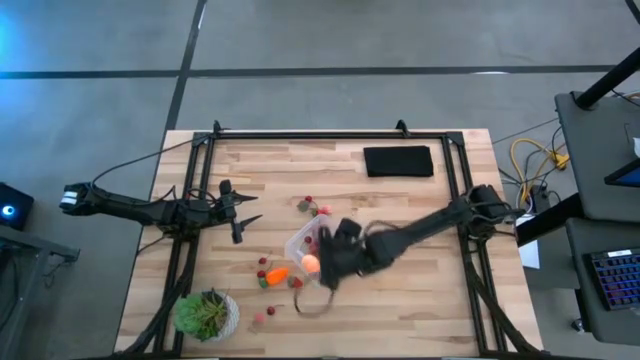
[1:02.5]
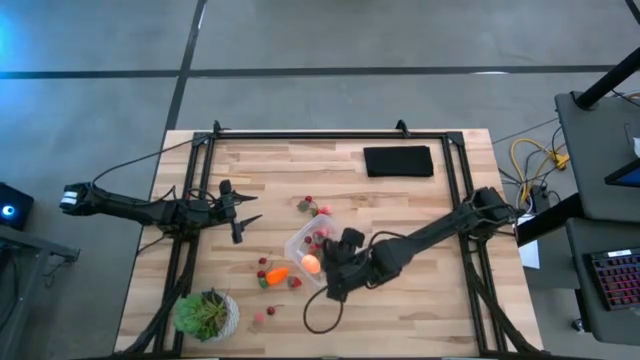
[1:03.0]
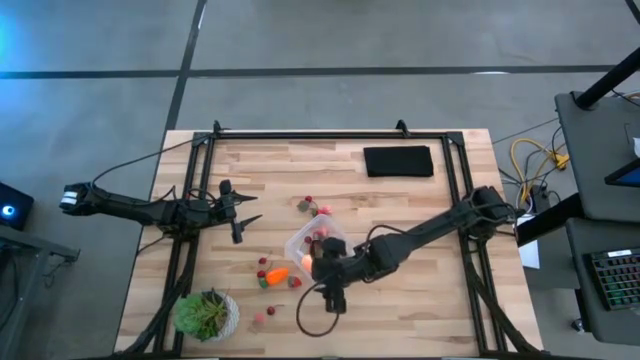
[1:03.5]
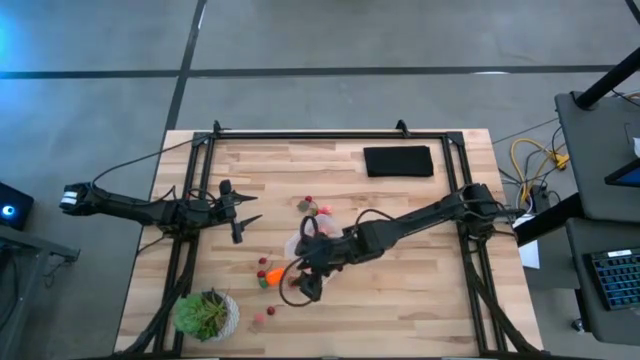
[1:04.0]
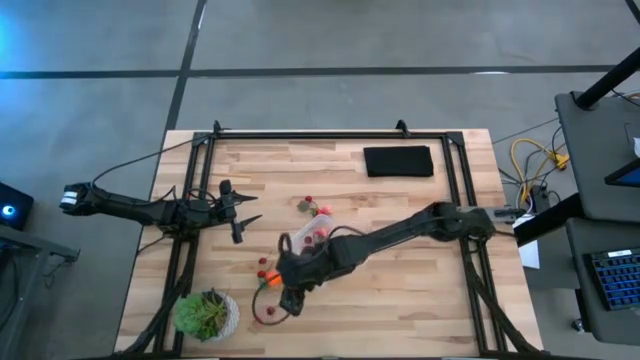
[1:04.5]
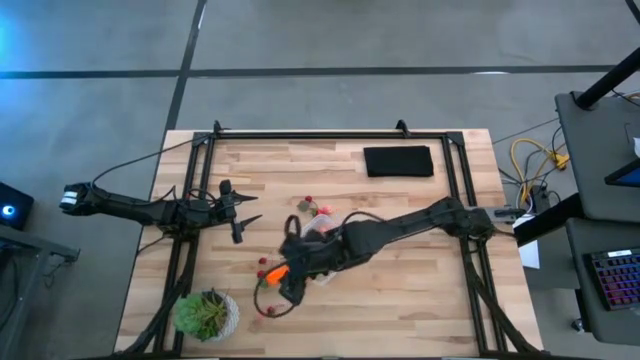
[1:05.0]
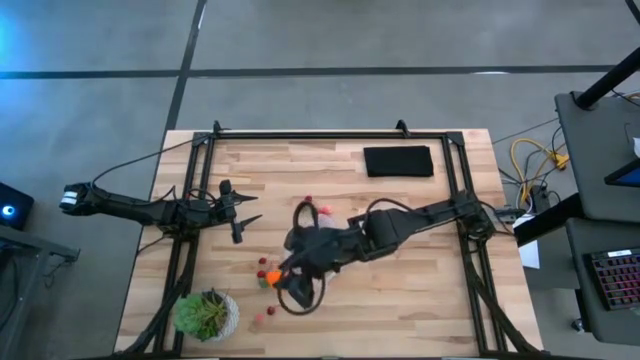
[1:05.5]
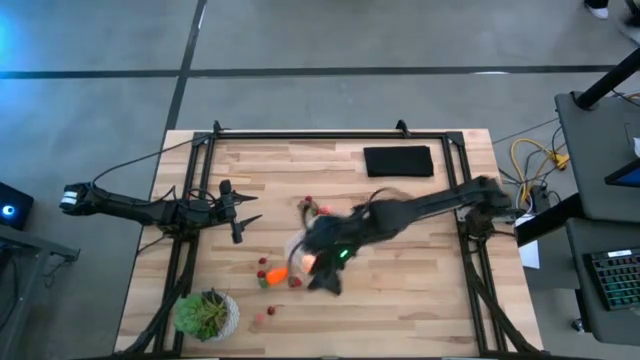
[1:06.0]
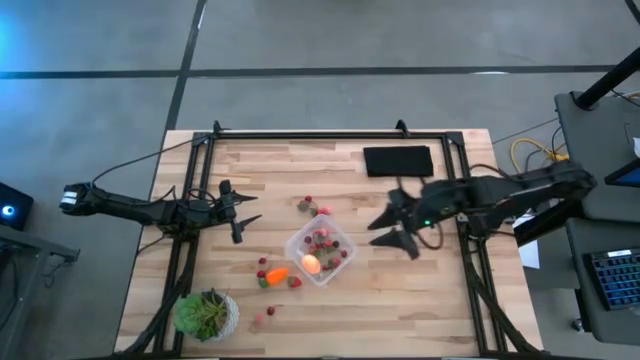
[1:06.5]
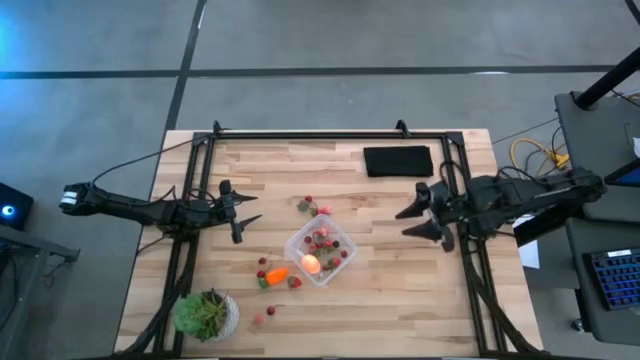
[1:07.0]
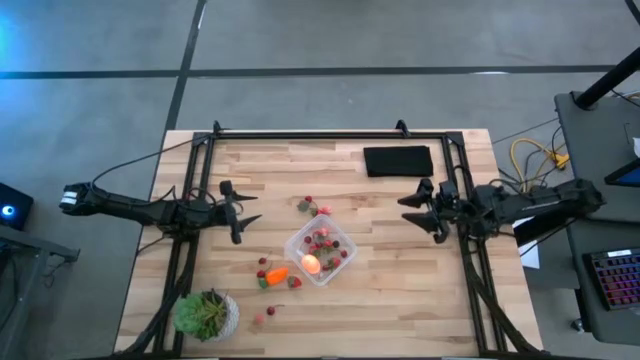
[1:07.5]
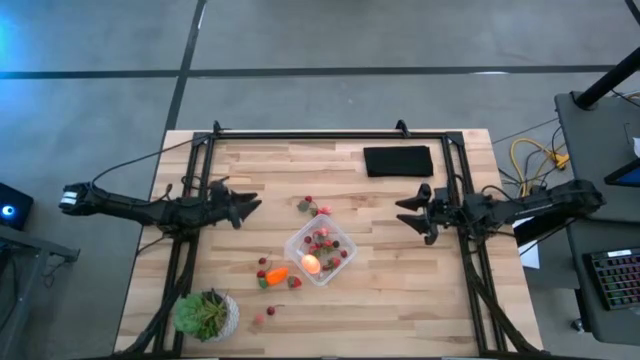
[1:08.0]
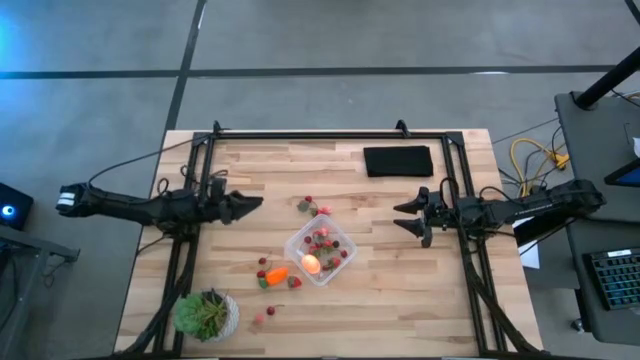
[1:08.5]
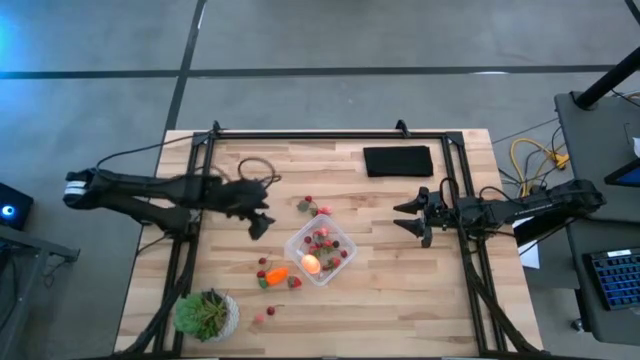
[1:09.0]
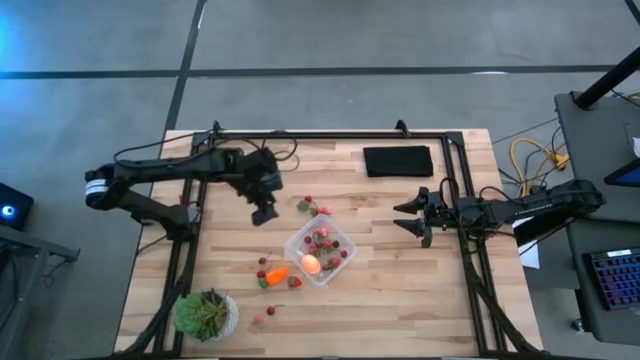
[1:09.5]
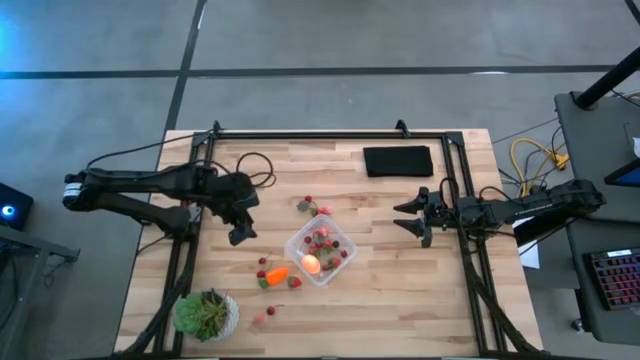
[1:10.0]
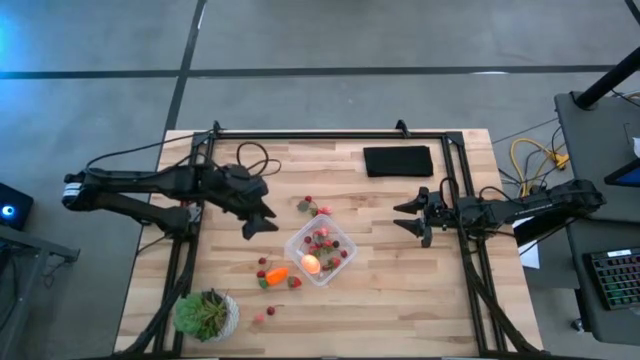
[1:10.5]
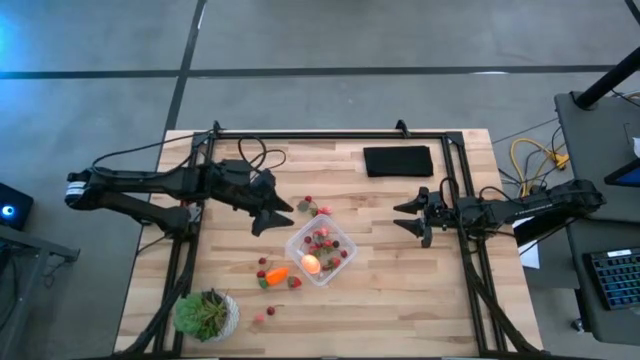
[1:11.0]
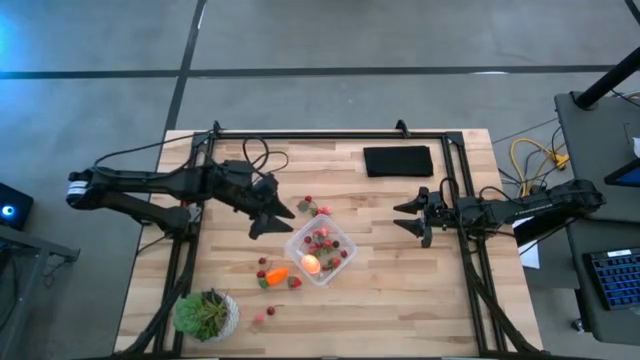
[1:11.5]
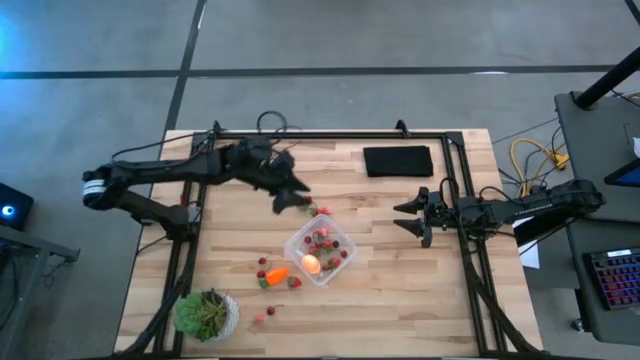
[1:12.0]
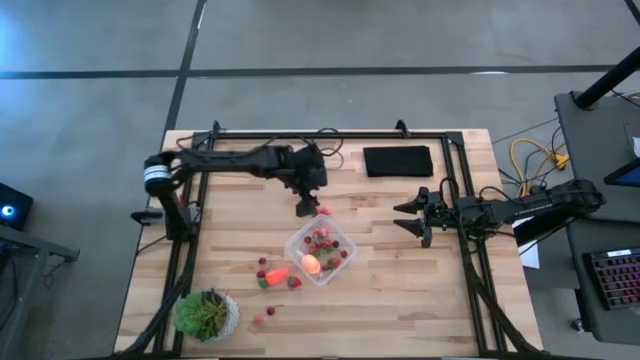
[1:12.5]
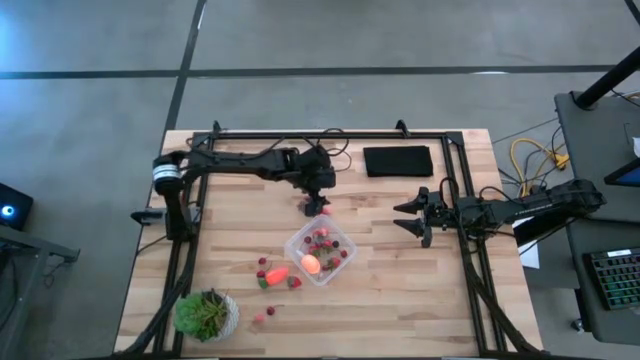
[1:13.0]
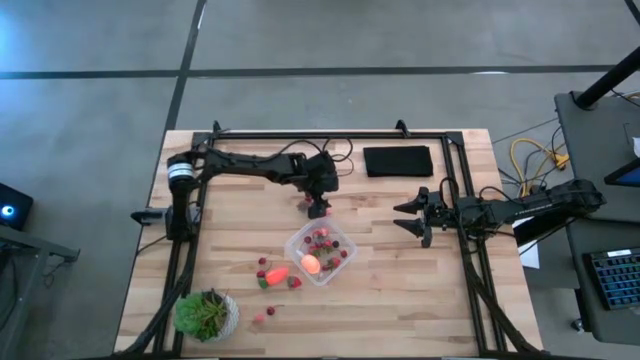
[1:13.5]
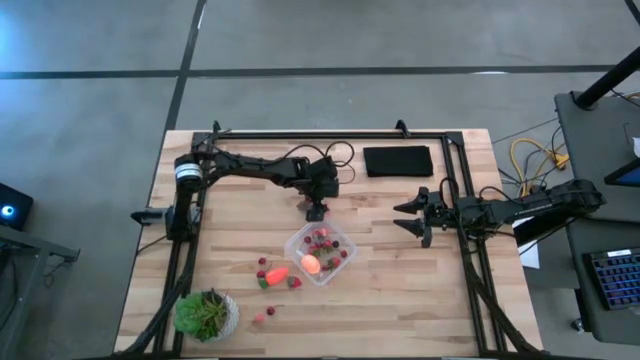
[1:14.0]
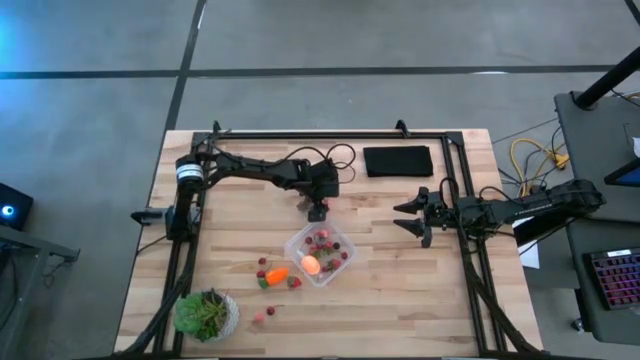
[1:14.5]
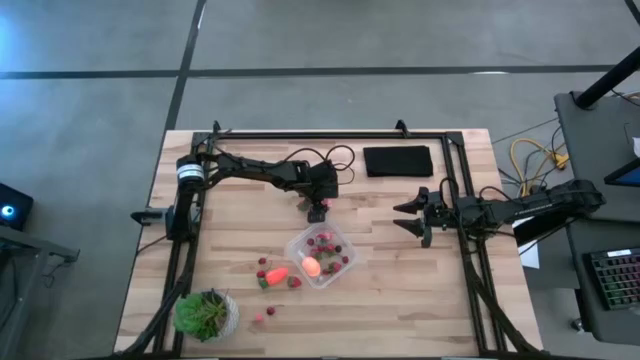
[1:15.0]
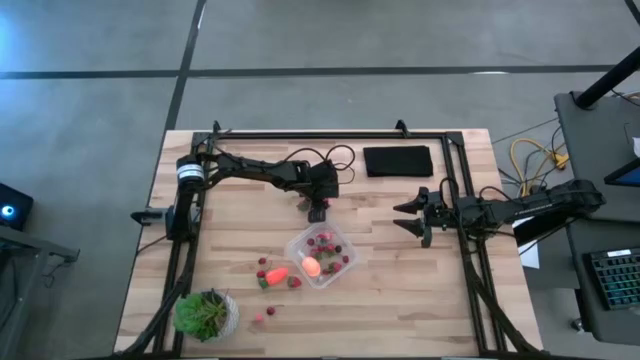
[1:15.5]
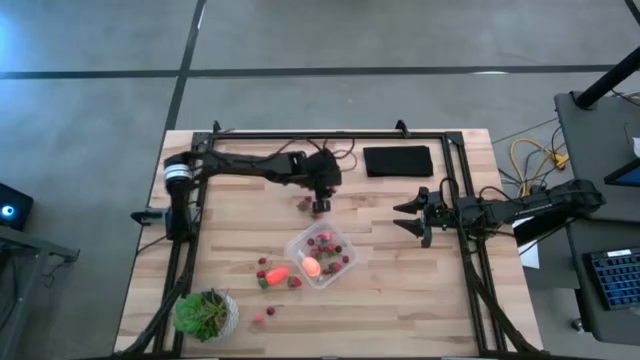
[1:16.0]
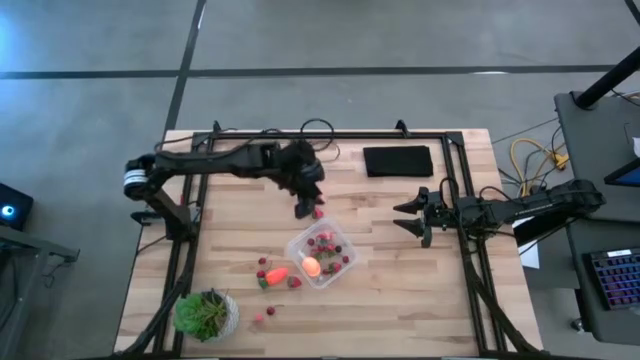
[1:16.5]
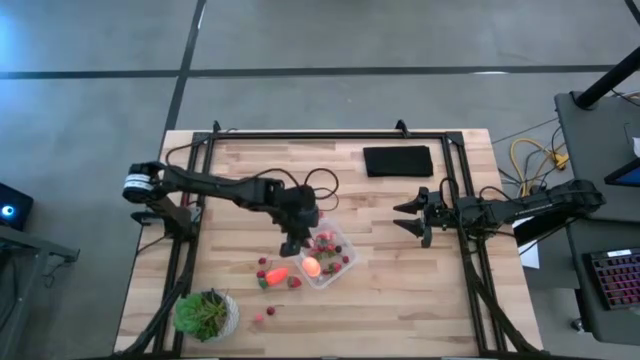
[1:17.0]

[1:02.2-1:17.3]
Task: Pick and placing Produce into tupperware
Put the pink peach into the transparent container

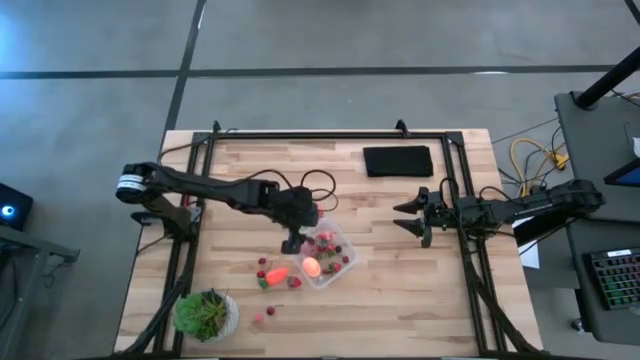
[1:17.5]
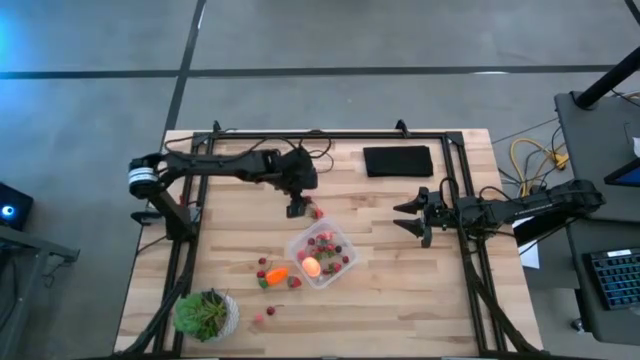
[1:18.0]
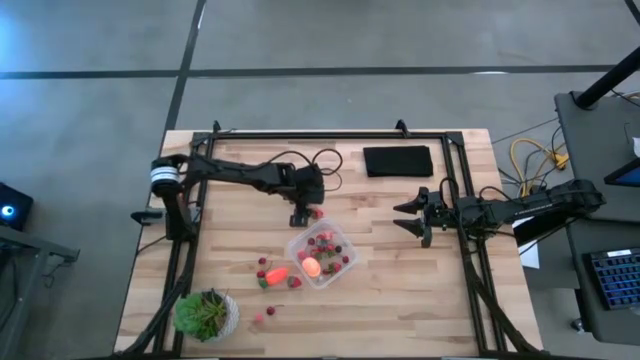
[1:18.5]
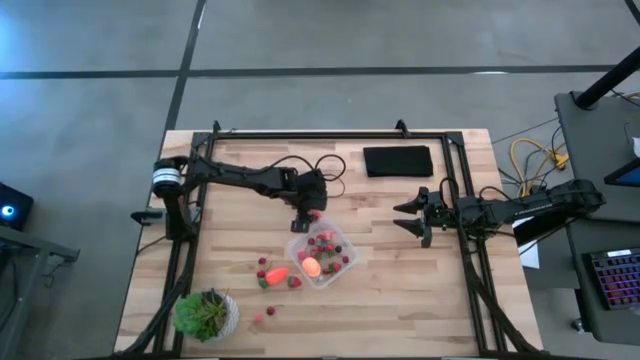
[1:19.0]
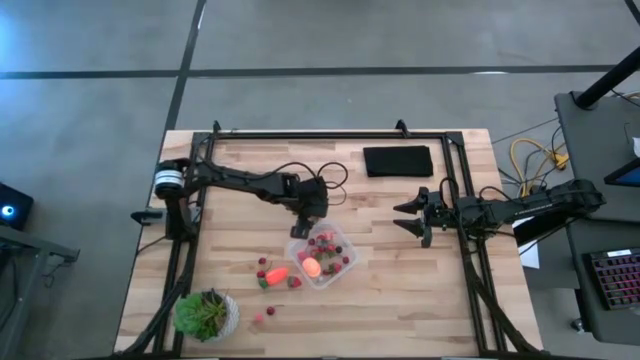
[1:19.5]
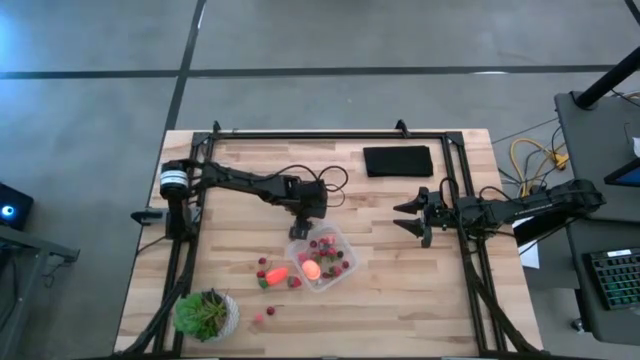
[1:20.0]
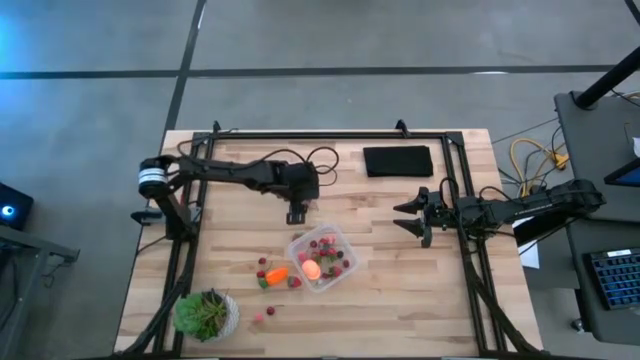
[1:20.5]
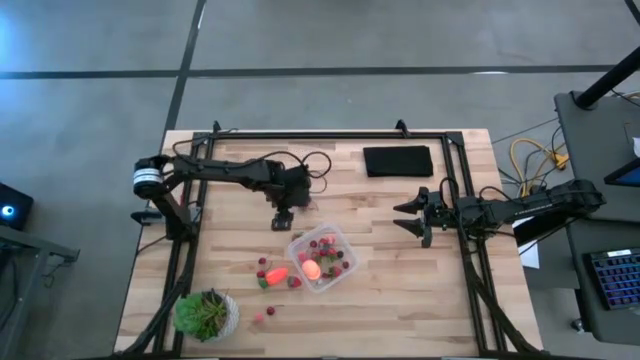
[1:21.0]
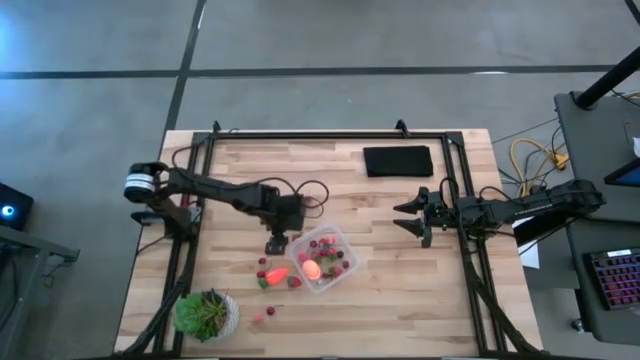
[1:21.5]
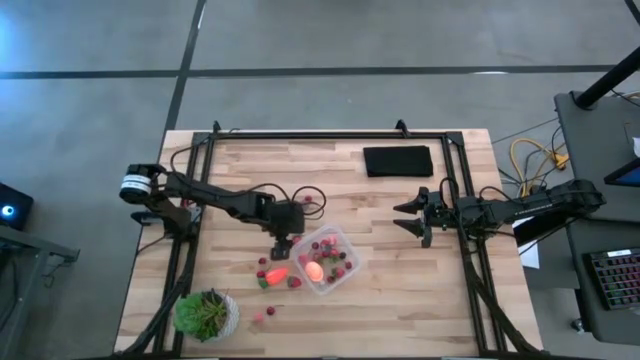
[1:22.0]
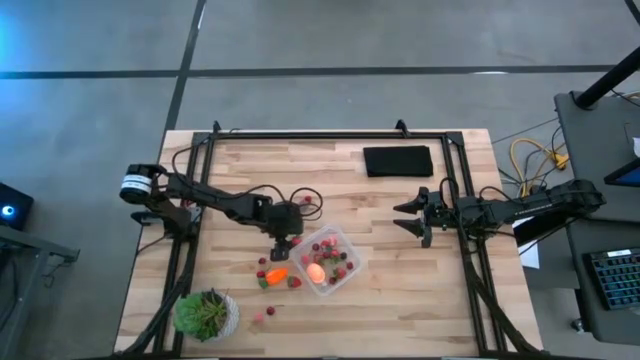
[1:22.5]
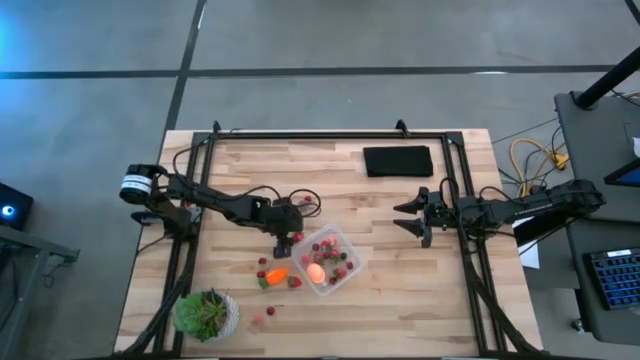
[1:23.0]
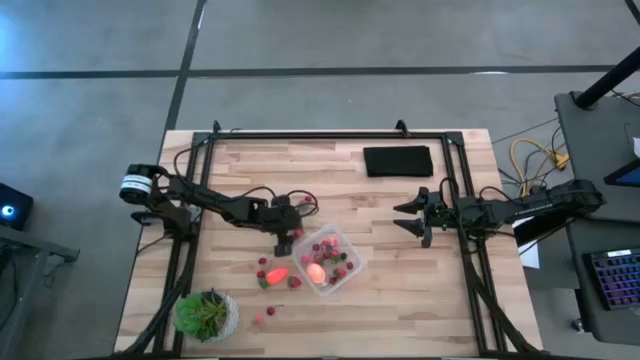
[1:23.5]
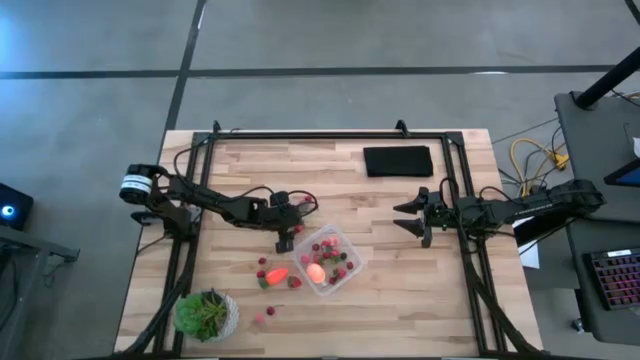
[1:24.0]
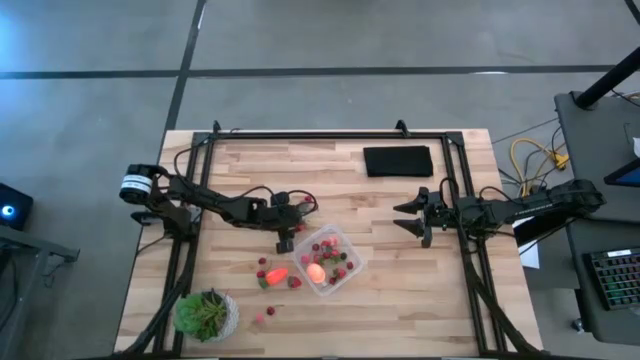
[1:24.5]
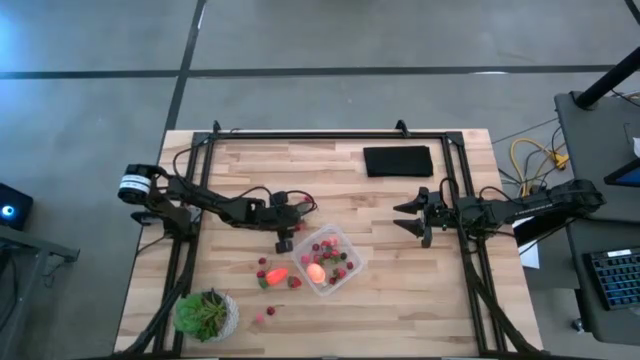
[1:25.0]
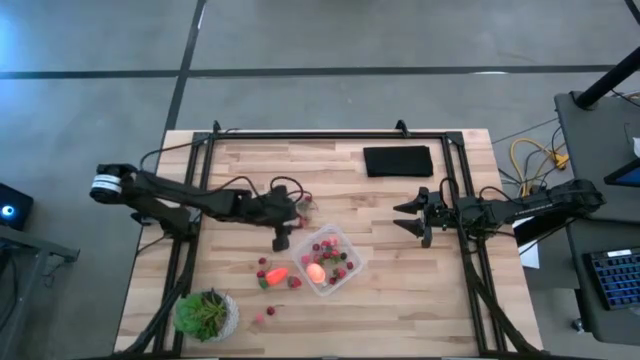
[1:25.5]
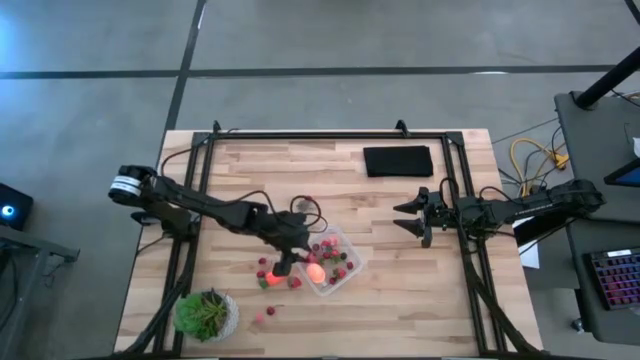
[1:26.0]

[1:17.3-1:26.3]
Put the red strawberry into the transparent container
